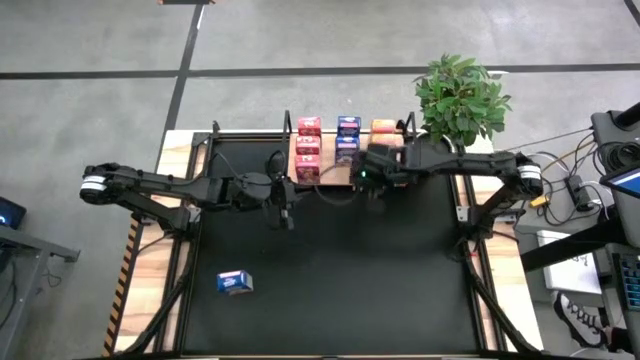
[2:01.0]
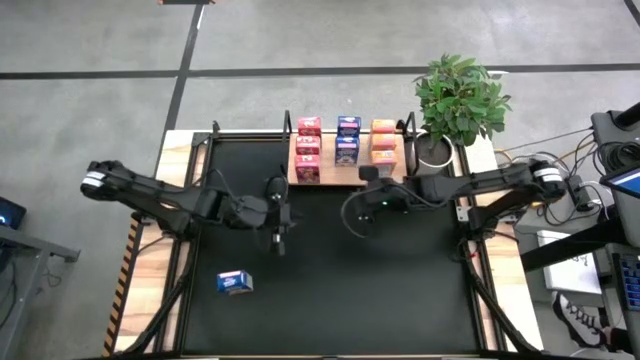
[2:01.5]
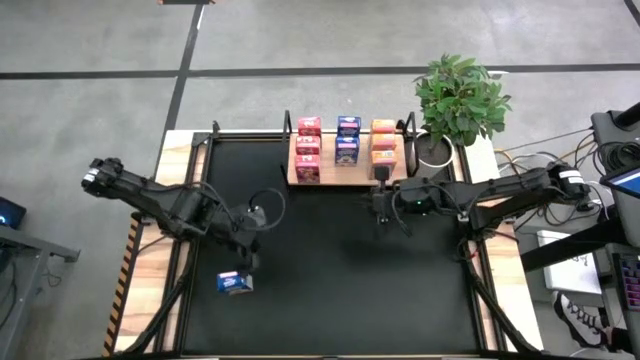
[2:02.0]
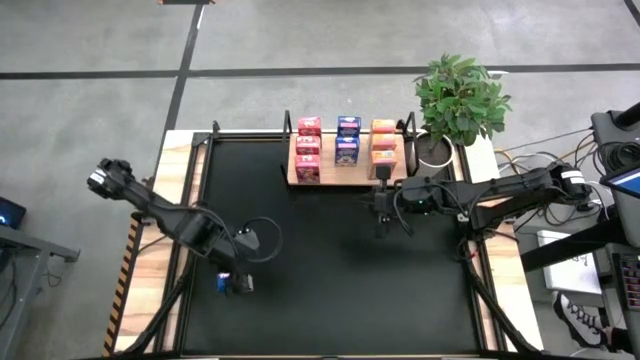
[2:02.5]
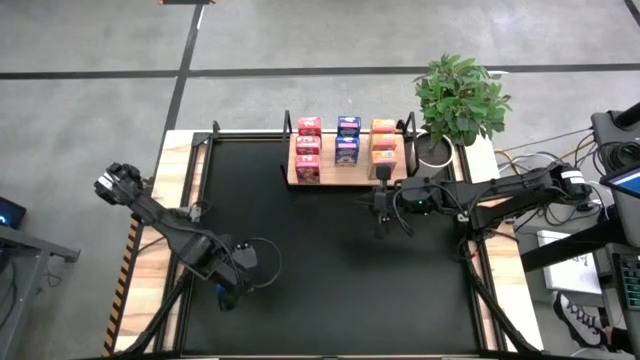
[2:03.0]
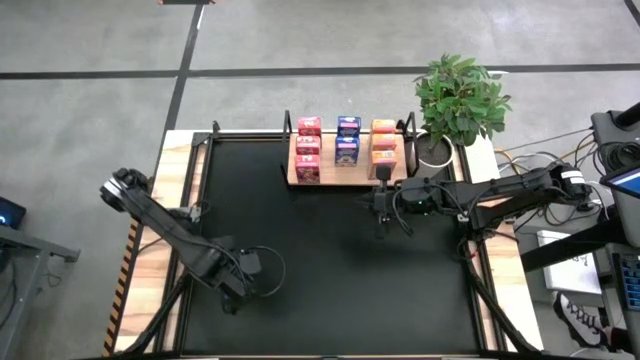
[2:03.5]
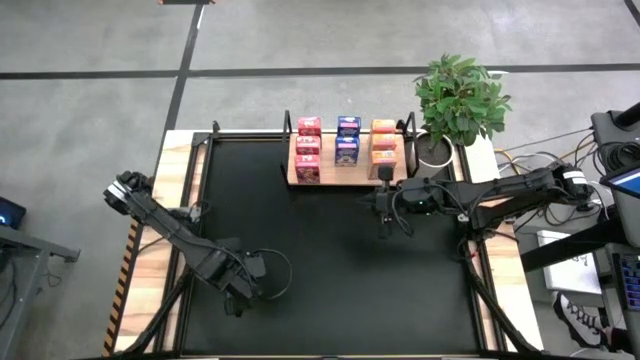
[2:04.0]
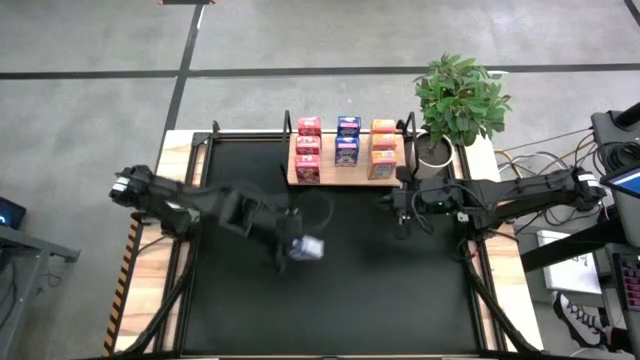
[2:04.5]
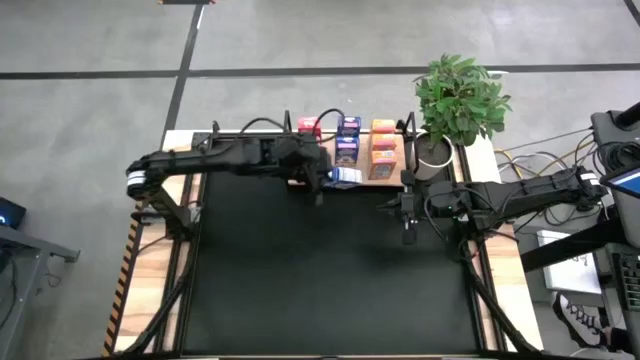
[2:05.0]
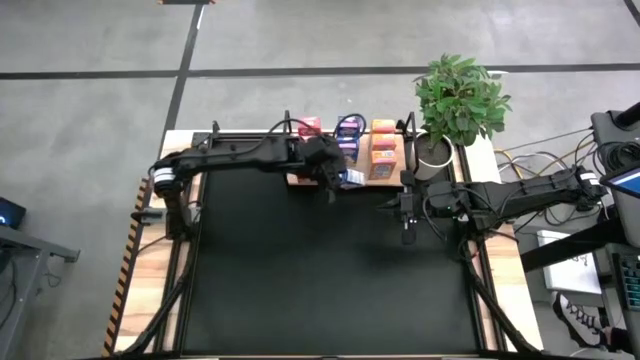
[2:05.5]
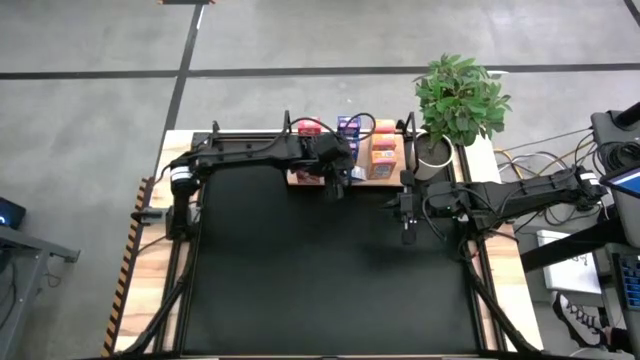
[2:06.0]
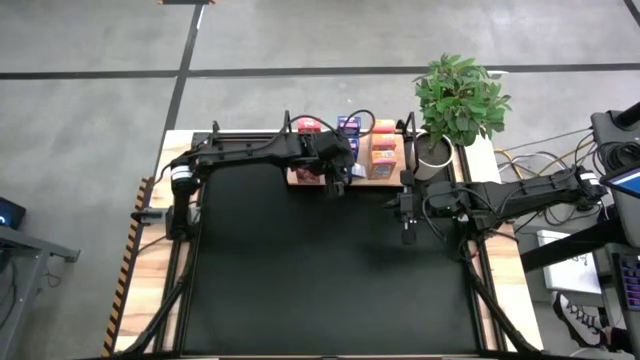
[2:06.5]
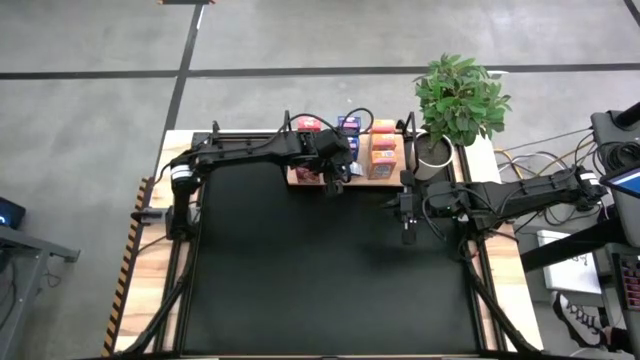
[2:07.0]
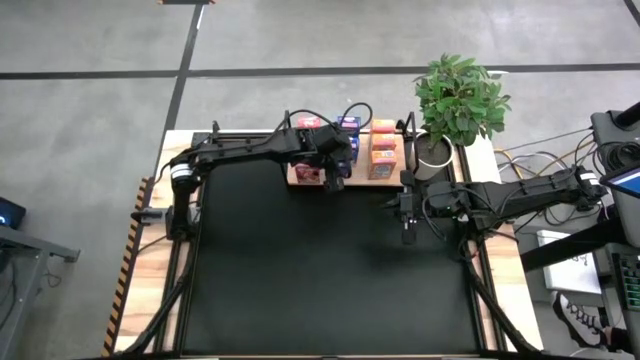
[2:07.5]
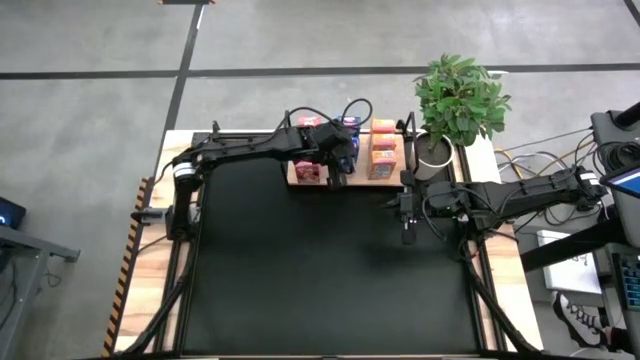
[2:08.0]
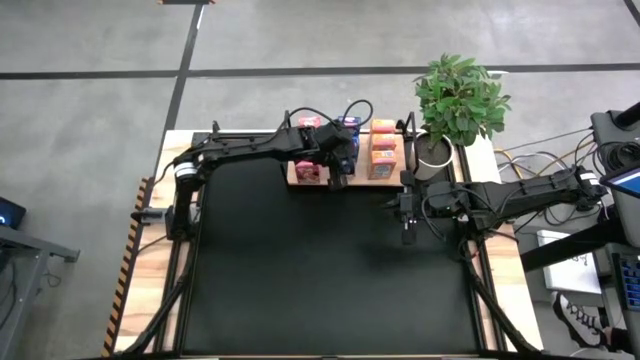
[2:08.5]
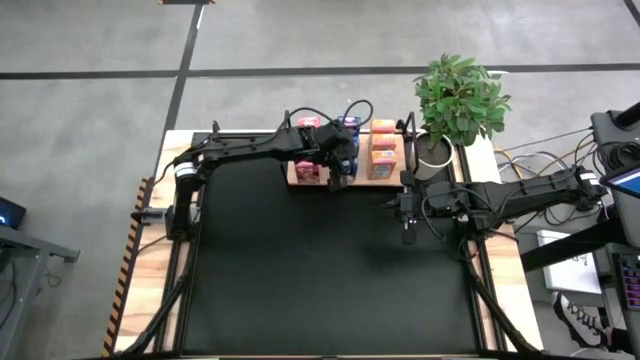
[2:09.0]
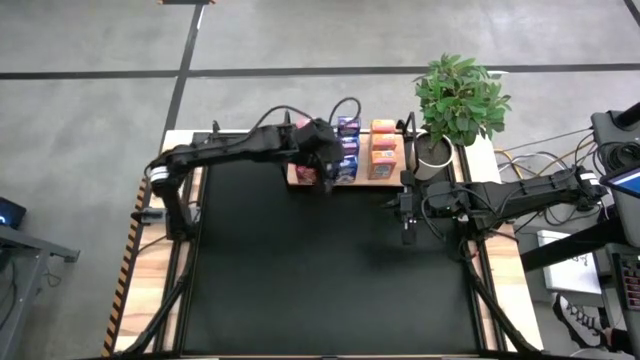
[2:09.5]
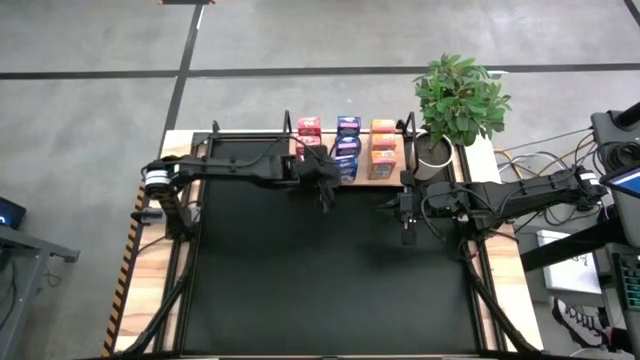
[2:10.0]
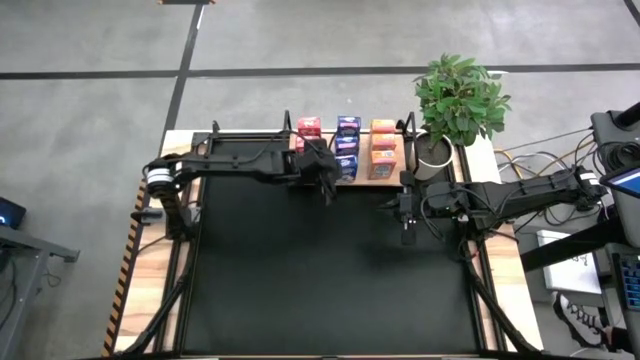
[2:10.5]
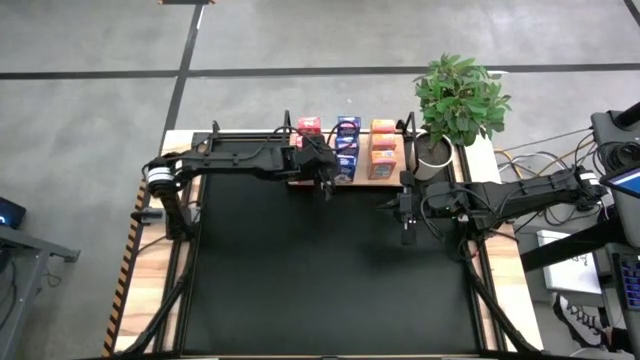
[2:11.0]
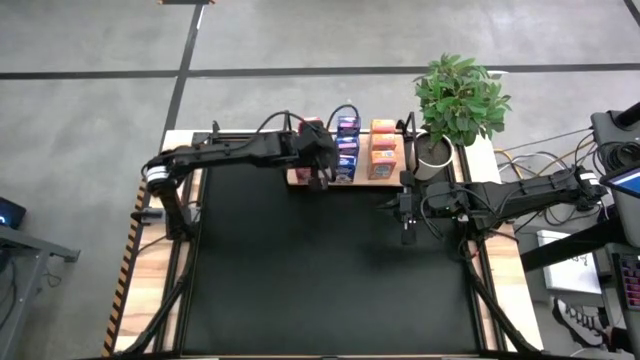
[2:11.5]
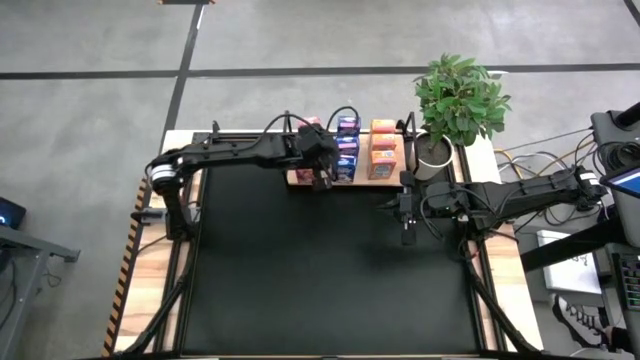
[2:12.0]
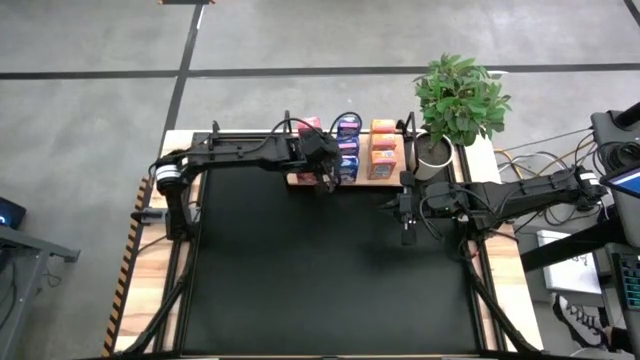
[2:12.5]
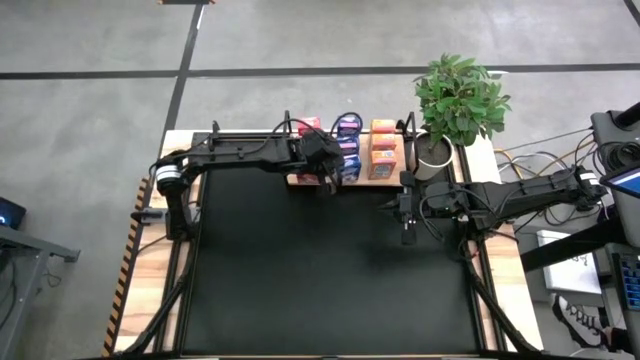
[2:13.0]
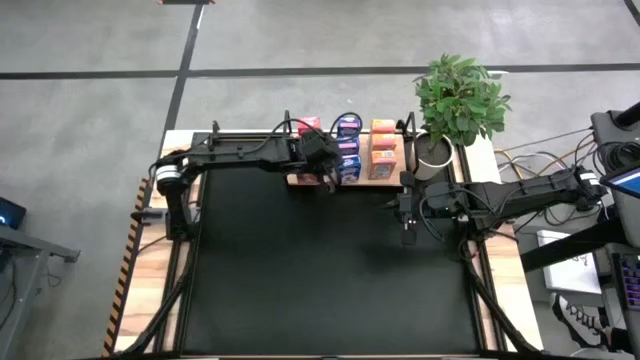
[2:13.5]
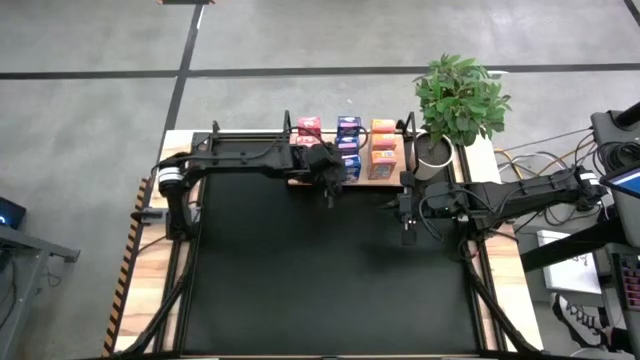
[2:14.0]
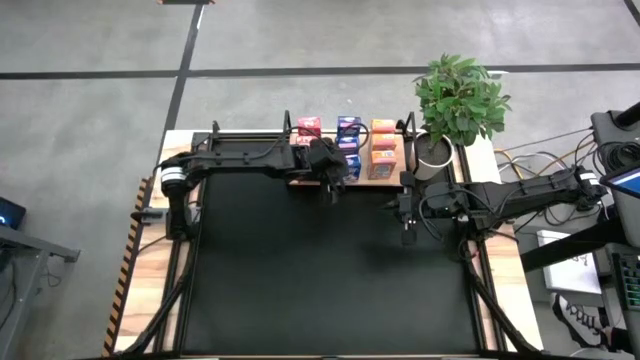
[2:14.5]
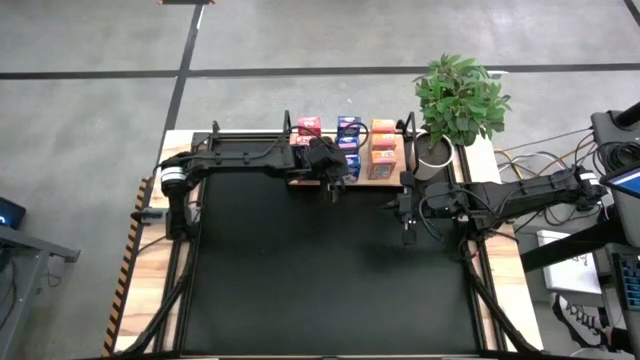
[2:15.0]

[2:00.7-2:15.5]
Task: Stack cereal on shelf
Put the blue cereal box aligned with the other blue cereal boxes on the shelf

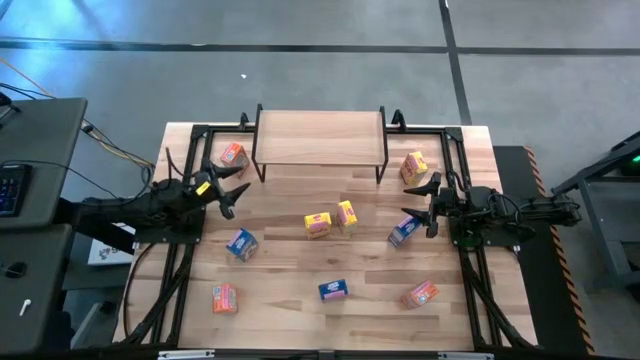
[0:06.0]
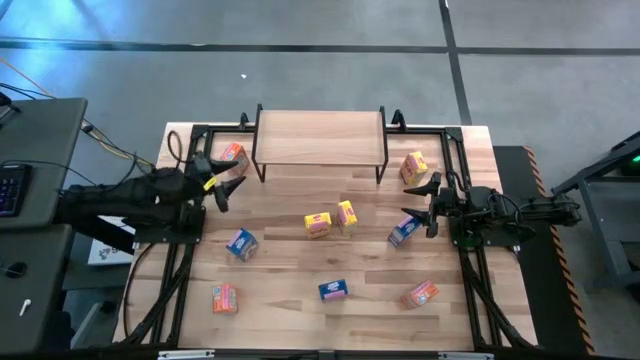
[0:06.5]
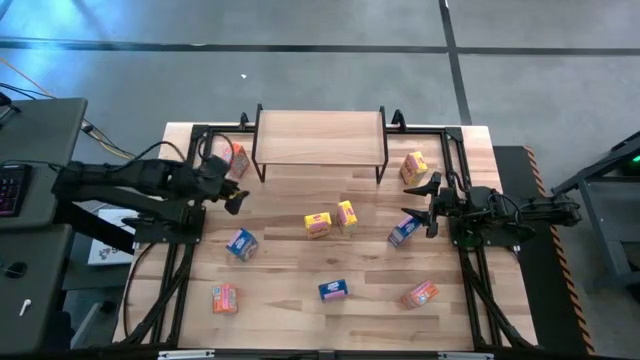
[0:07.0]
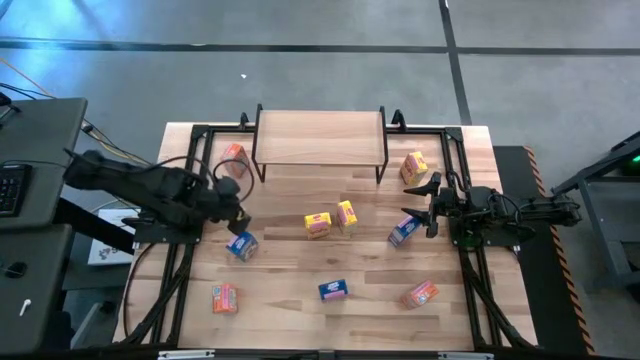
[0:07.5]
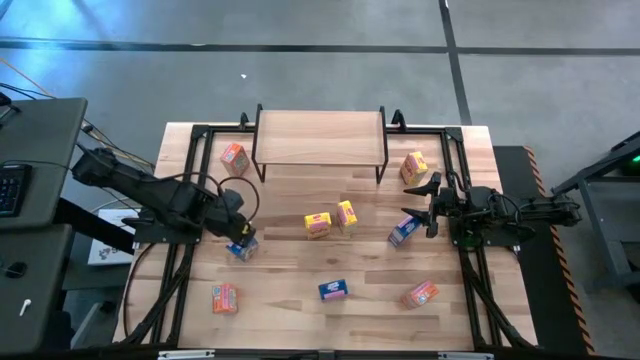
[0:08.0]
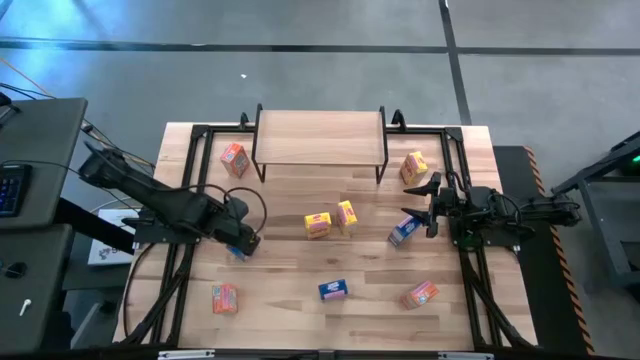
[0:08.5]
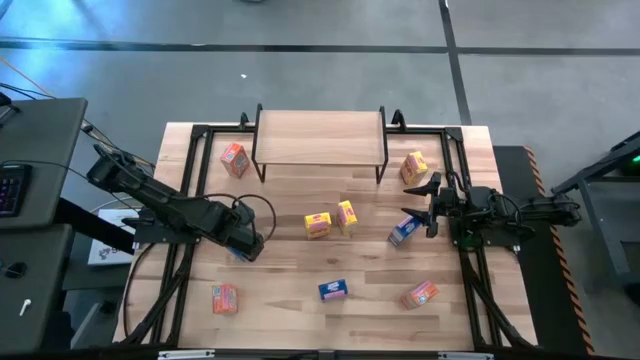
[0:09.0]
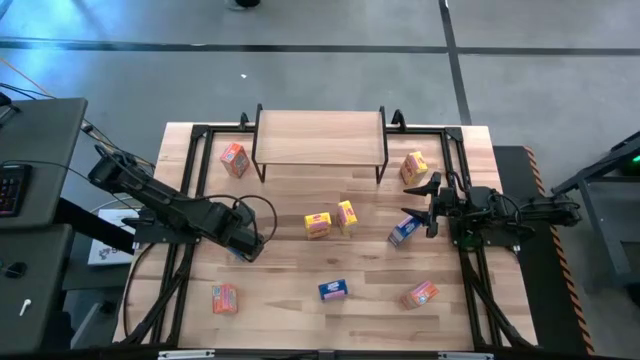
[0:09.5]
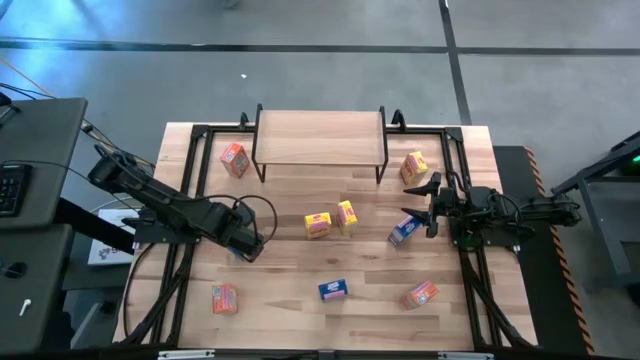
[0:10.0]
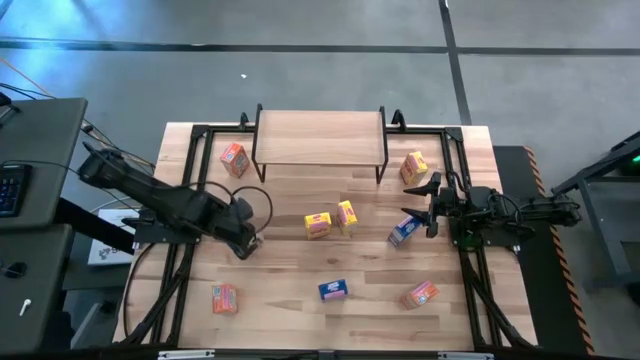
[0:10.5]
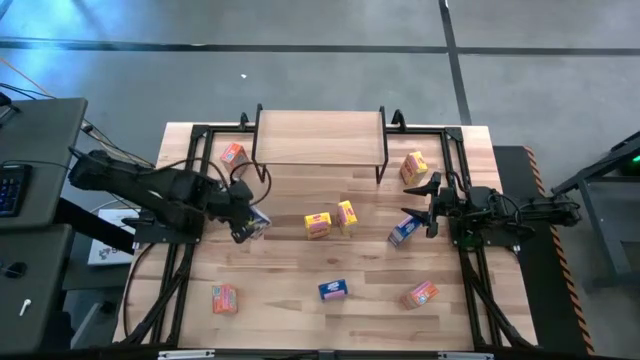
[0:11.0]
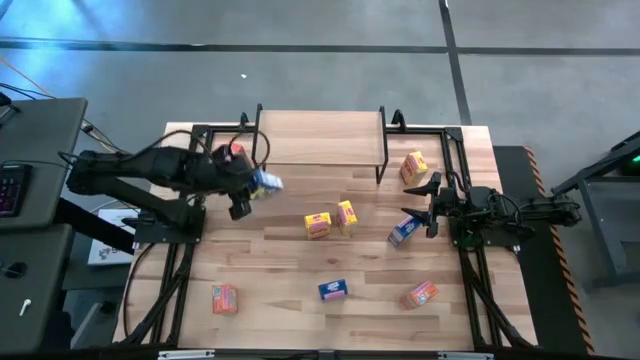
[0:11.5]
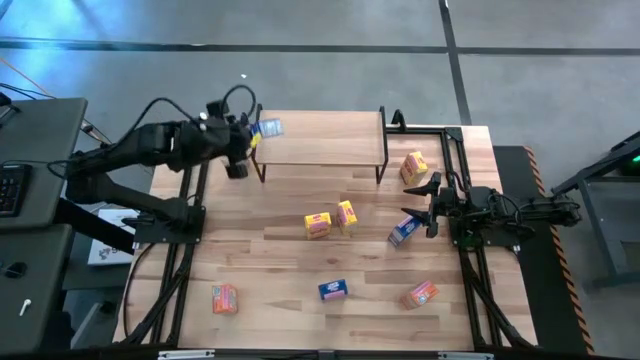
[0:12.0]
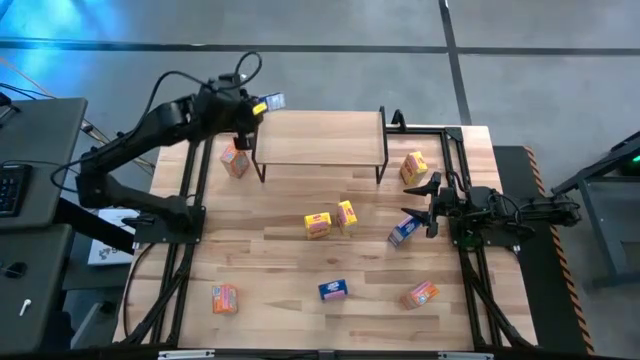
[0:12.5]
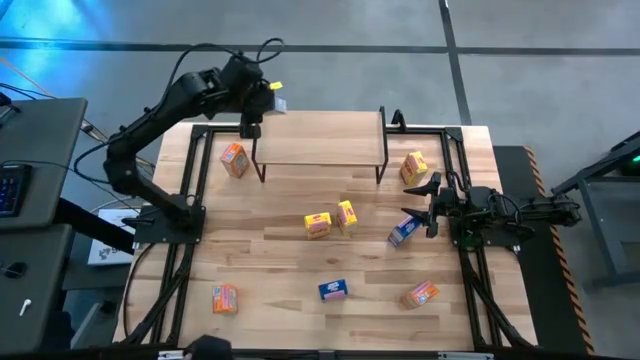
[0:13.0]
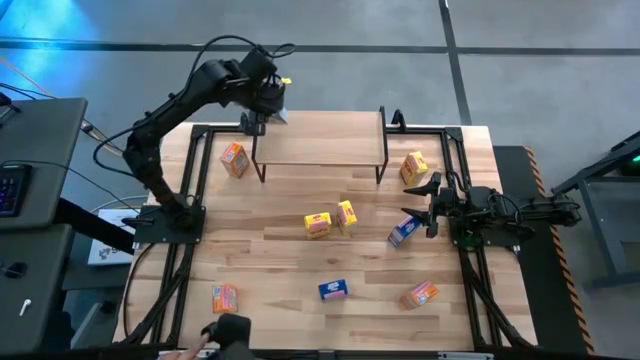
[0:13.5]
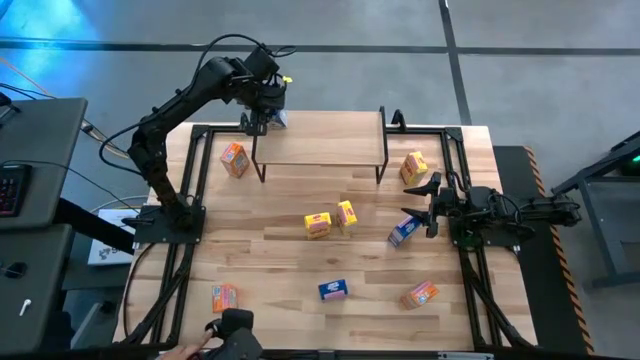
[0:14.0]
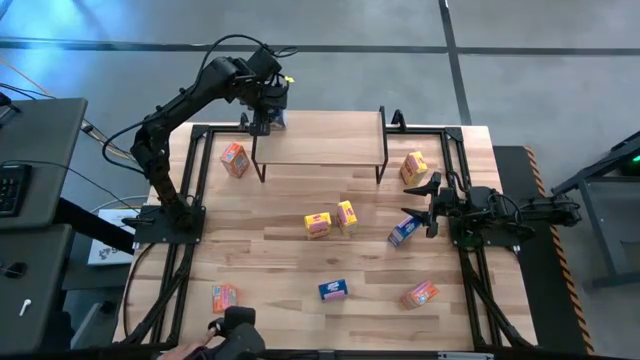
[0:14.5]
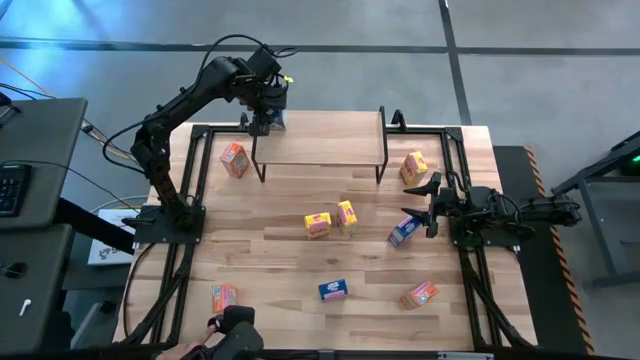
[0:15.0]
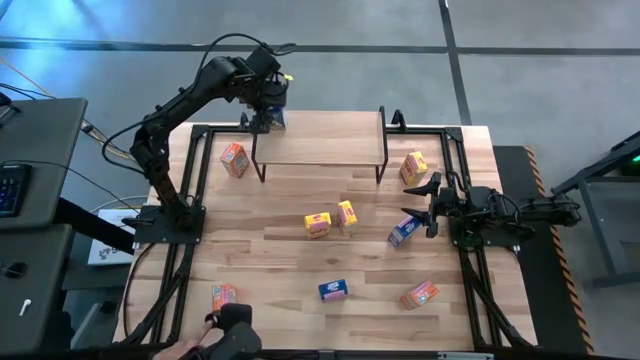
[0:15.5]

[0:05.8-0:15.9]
Task: Stack cereal on shelf
Put the top left blue cereal box on the shelf
